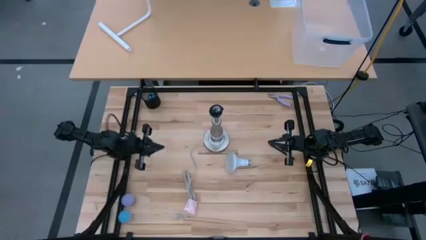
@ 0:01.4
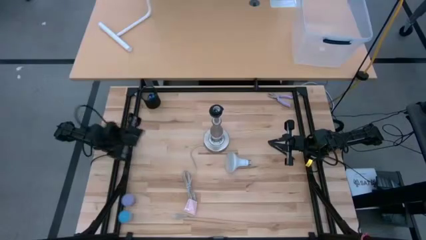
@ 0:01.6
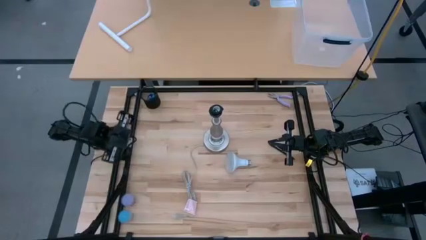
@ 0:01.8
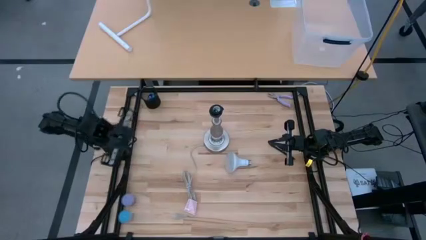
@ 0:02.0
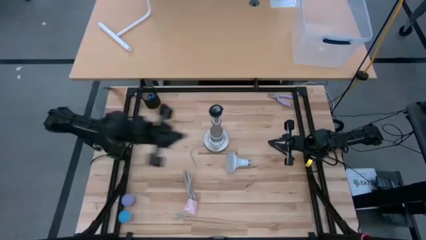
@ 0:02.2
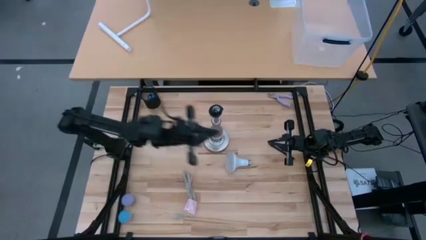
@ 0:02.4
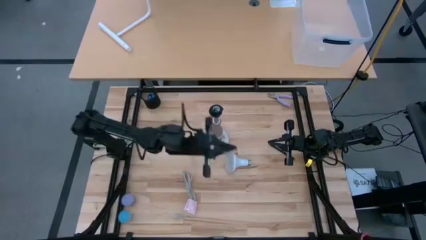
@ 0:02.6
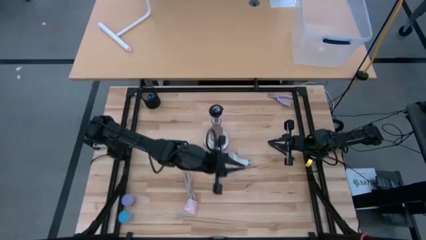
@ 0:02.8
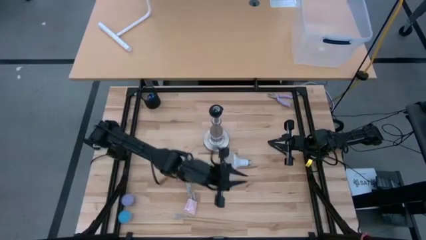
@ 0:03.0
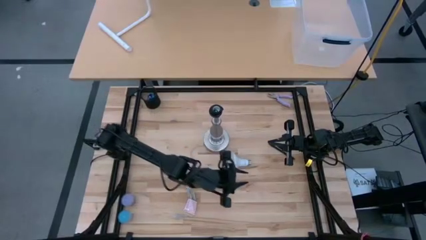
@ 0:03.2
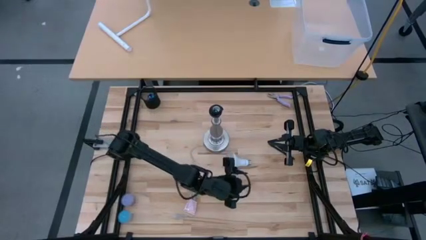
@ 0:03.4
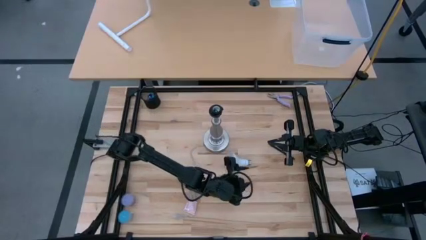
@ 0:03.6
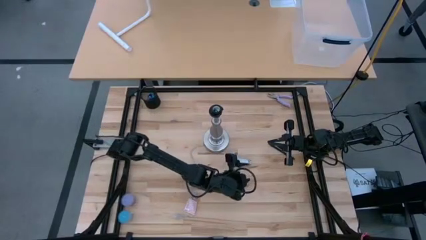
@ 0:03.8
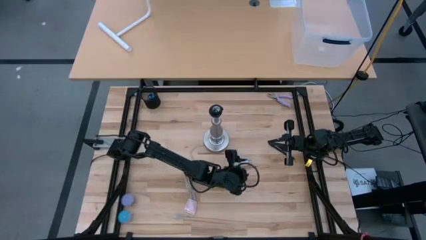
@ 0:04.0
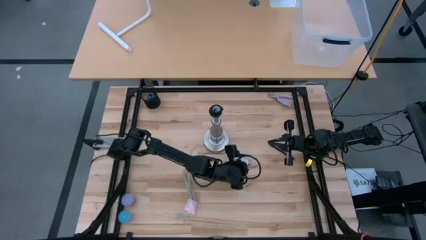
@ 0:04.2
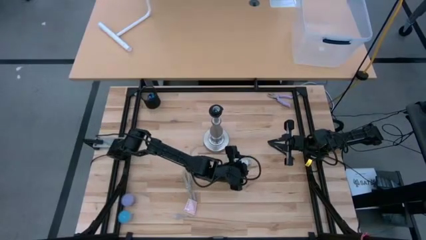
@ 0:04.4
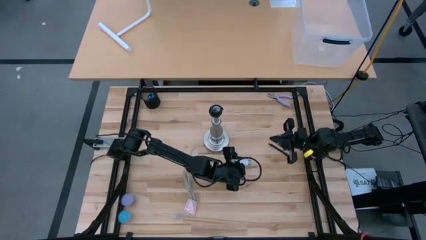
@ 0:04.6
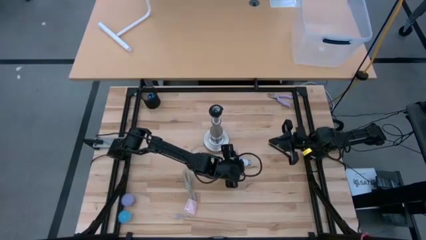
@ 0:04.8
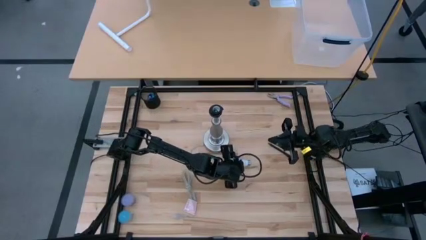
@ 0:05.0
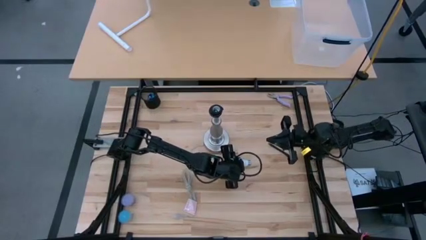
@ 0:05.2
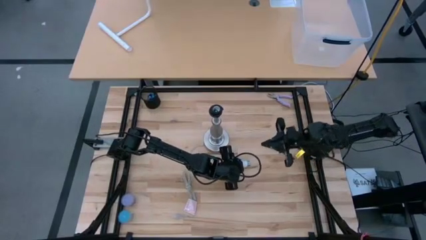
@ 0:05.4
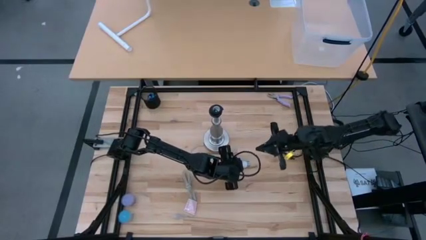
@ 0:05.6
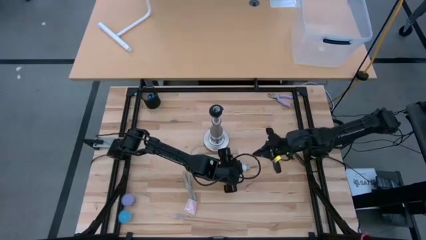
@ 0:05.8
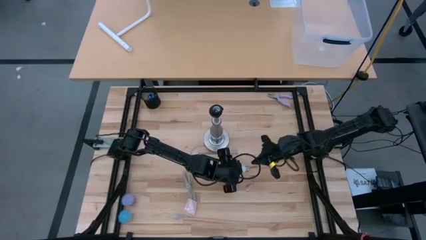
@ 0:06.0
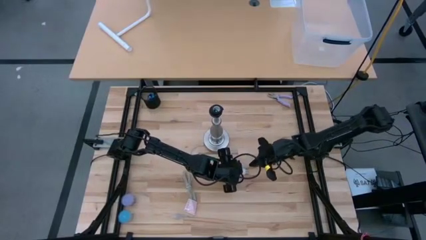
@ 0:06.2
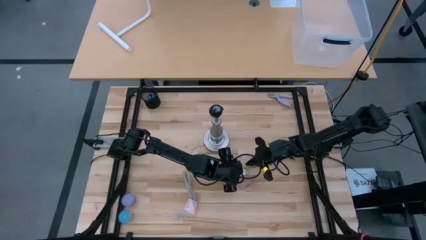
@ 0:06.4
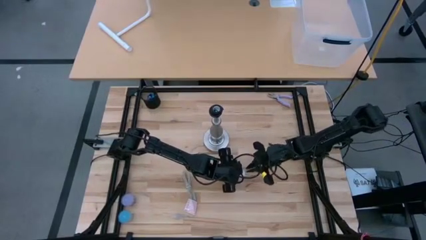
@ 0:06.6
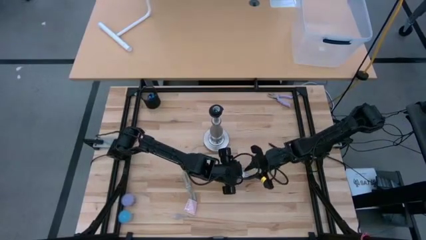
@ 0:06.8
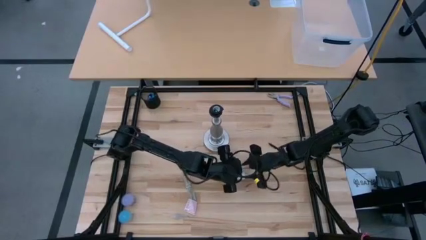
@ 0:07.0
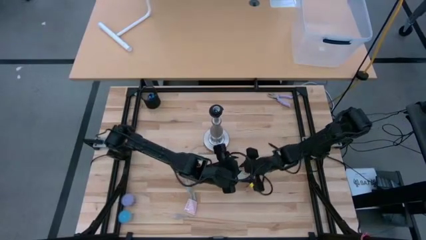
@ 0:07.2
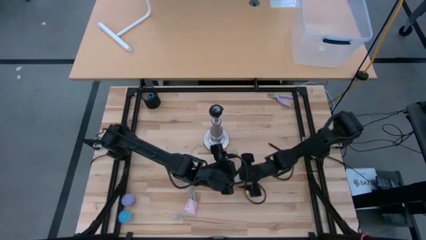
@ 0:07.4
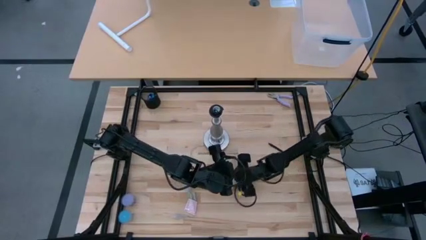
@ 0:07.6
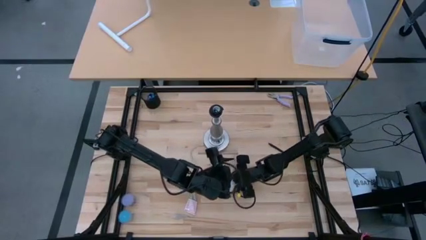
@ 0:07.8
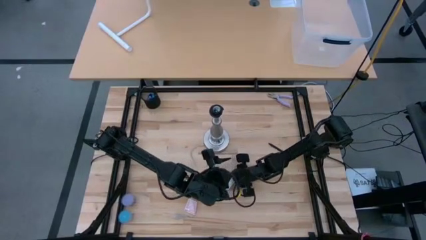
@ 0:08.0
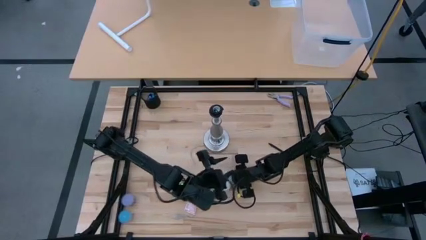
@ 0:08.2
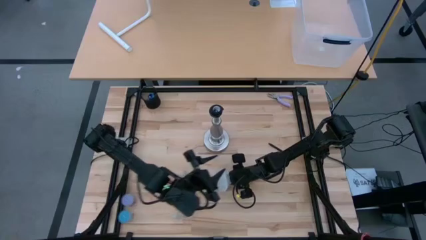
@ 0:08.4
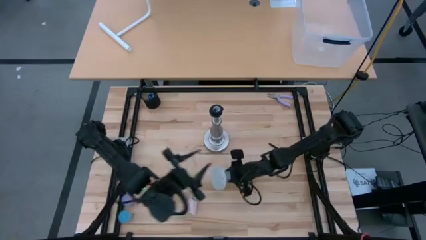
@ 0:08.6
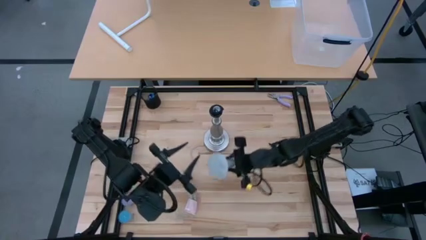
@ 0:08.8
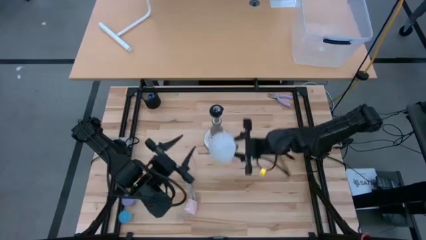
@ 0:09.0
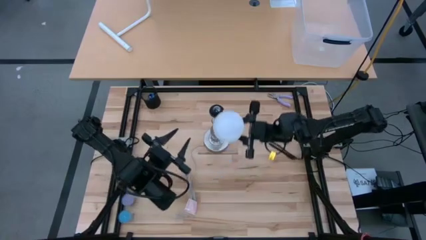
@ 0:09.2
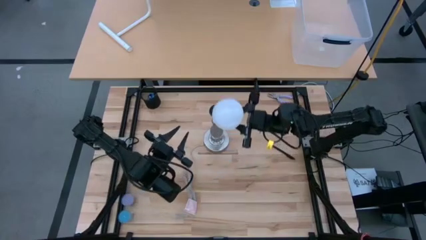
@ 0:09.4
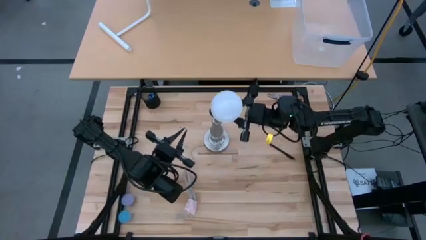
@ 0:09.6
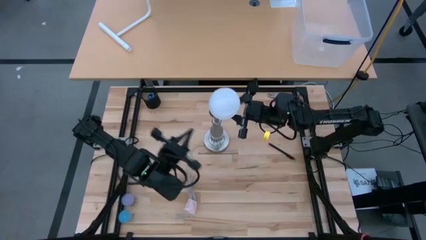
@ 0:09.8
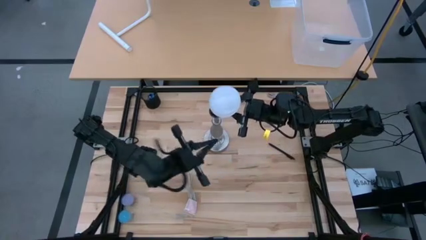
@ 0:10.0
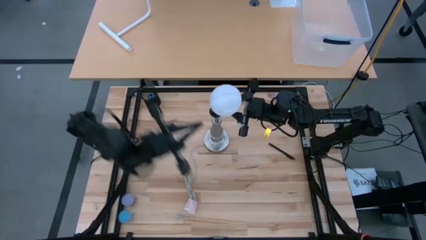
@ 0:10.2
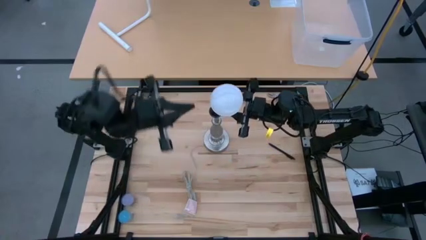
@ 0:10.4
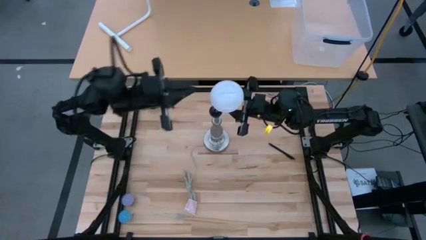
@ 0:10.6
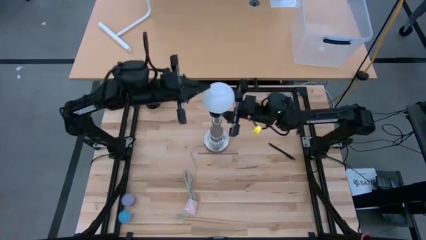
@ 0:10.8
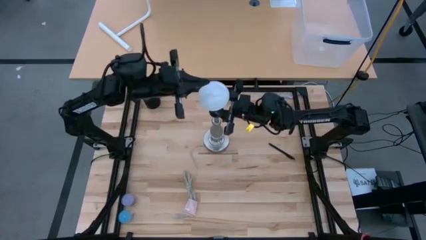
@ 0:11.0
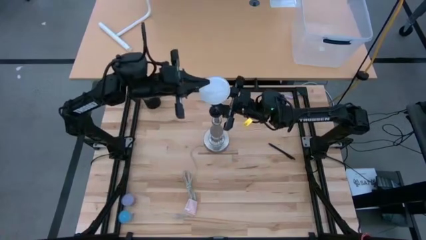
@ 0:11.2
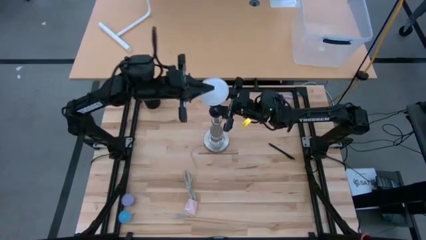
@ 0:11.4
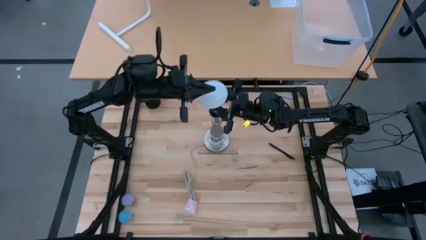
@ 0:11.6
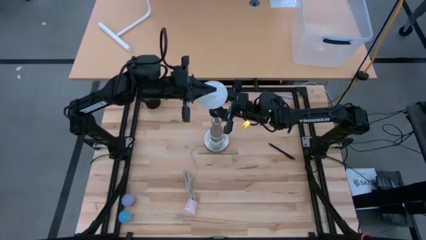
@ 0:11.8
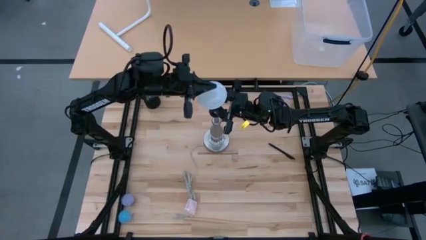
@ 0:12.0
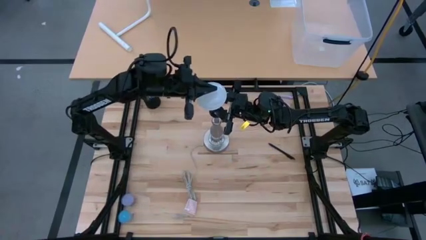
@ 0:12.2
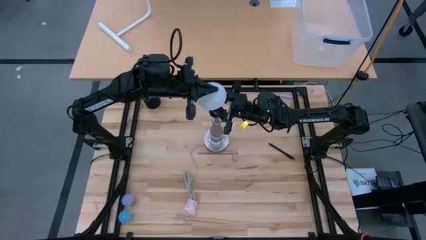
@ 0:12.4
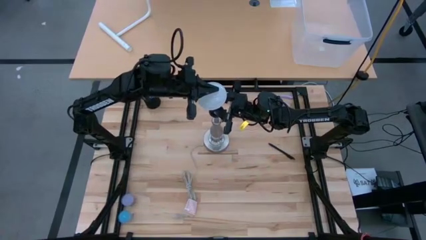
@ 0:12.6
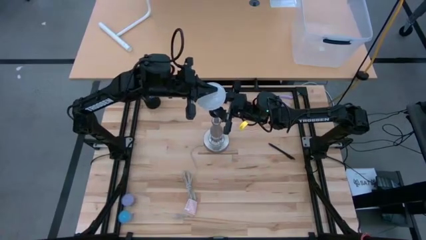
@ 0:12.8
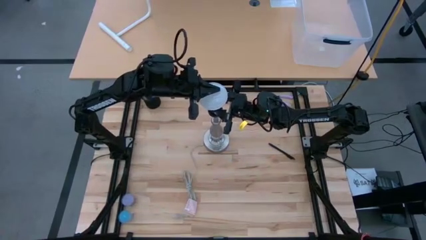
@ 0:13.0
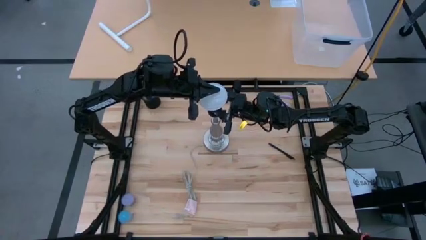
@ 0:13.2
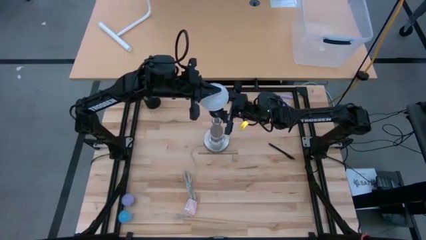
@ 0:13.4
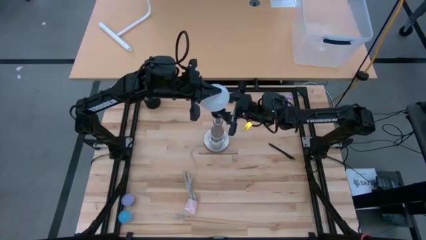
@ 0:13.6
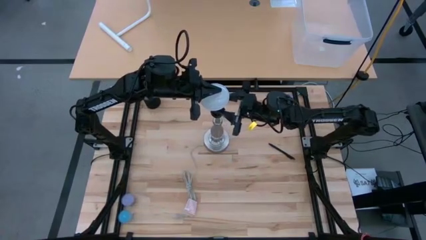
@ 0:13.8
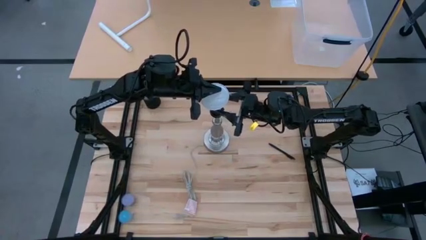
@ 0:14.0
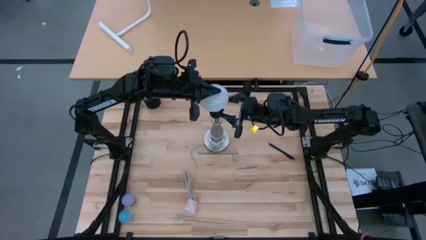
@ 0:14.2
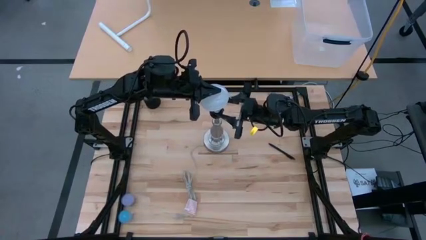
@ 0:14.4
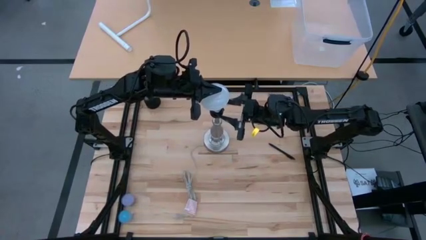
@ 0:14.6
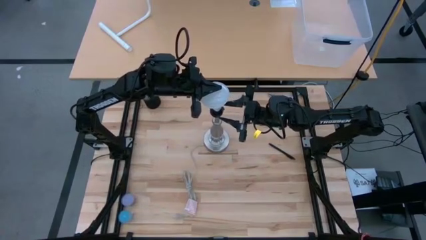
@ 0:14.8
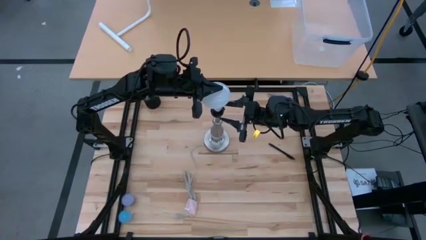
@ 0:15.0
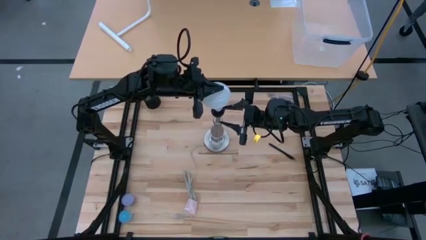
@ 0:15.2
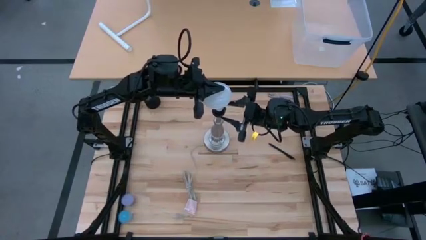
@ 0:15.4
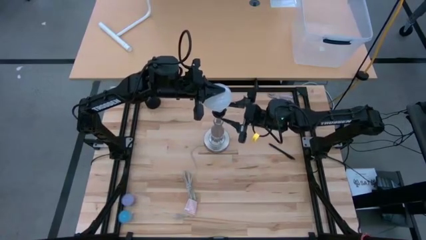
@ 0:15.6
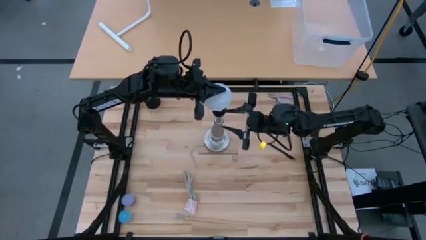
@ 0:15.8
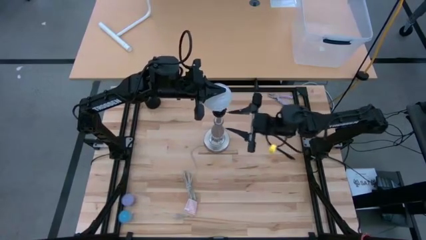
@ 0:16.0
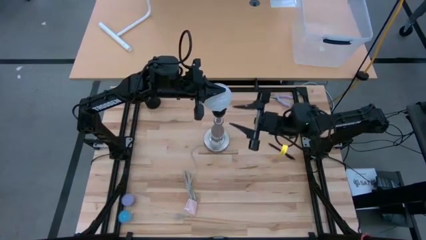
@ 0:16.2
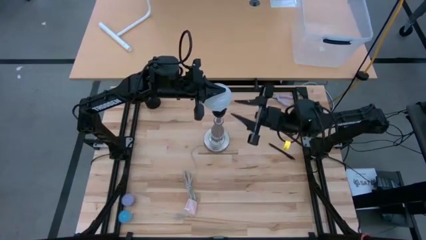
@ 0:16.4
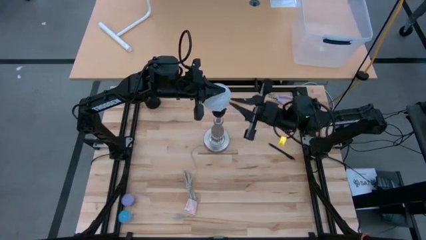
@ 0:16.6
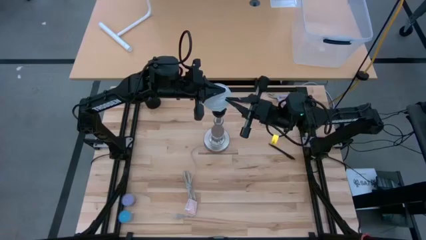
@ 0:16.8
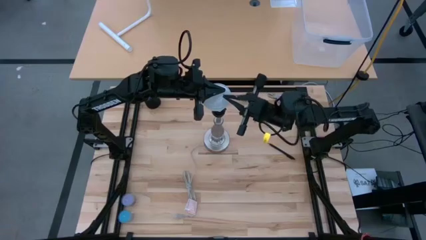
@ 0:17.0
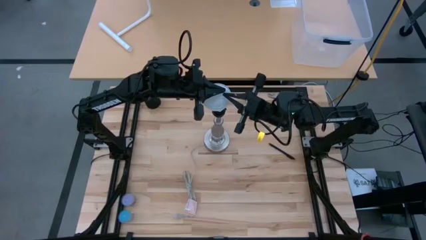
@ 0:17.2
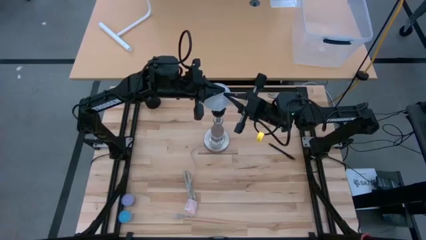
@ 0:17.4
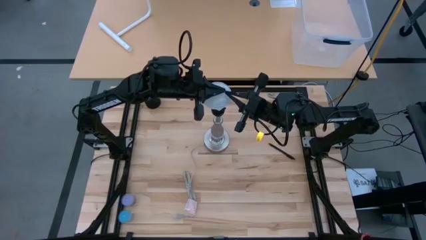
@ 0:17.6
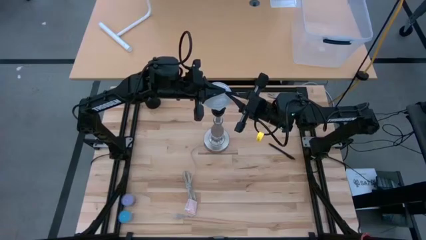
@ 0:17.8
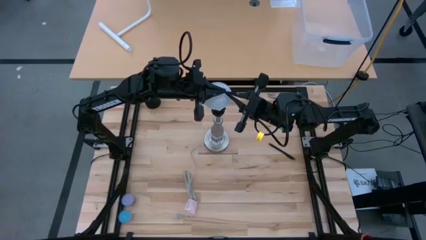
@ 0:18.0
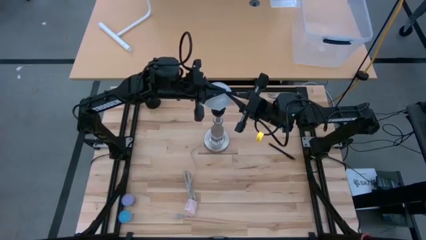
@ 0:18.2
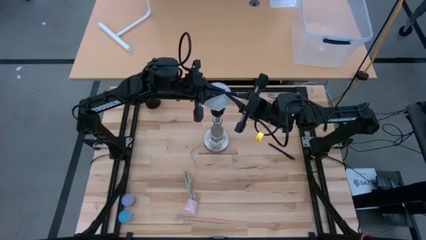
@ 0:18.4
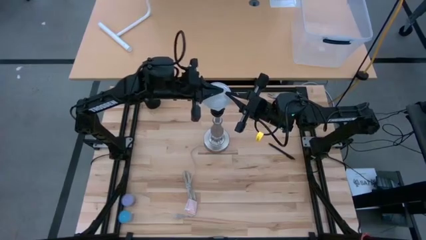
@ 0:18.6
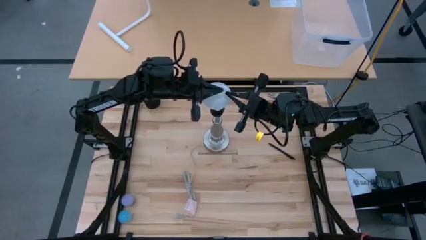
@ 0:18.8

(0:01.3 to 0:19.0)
Task: Screw lightbulb
Insert the lightbulb into the lamp
